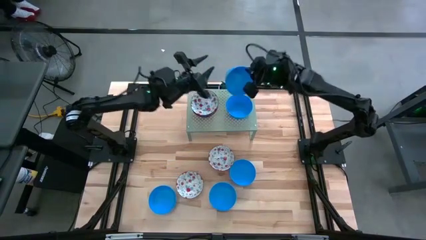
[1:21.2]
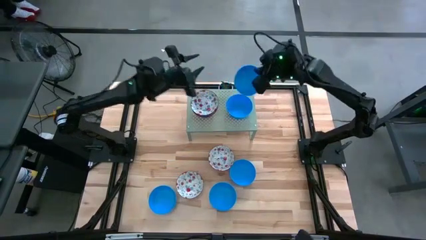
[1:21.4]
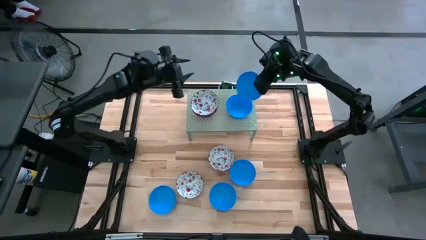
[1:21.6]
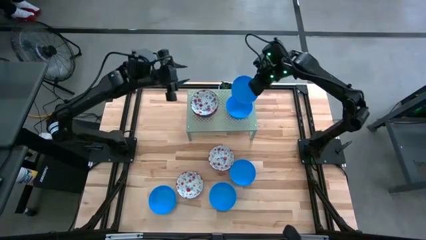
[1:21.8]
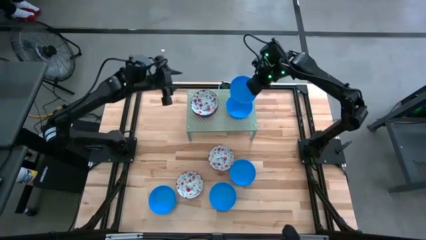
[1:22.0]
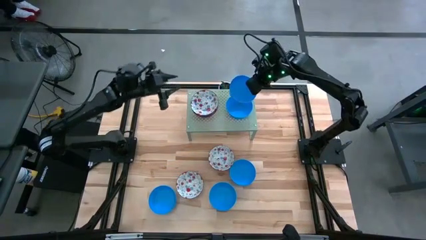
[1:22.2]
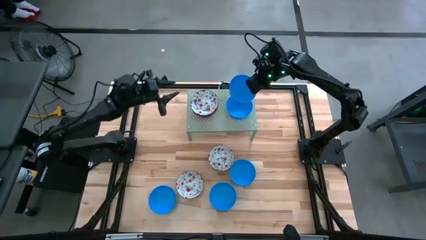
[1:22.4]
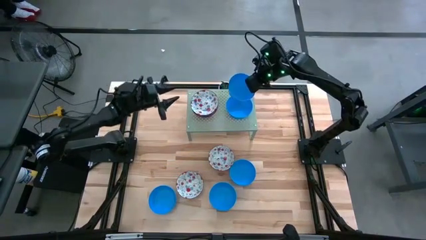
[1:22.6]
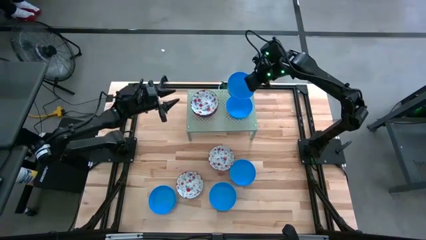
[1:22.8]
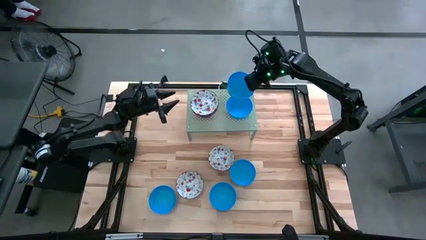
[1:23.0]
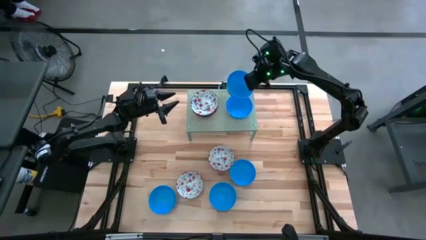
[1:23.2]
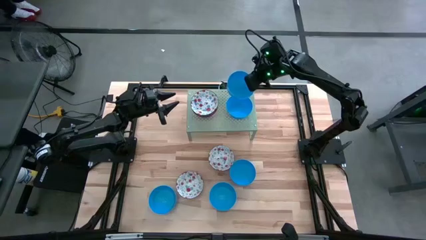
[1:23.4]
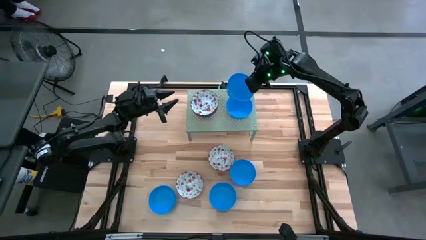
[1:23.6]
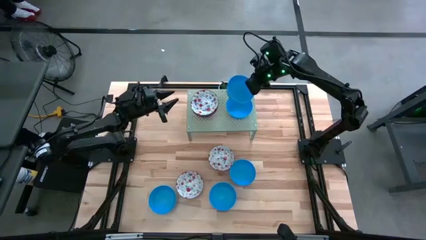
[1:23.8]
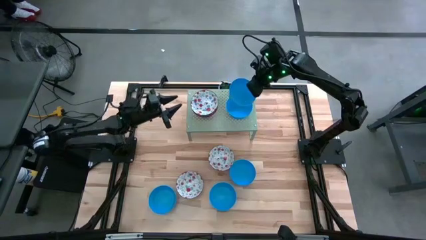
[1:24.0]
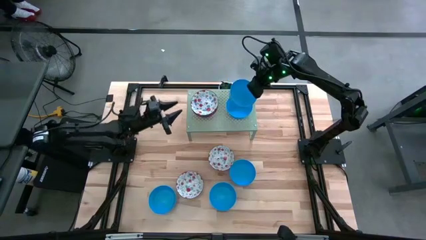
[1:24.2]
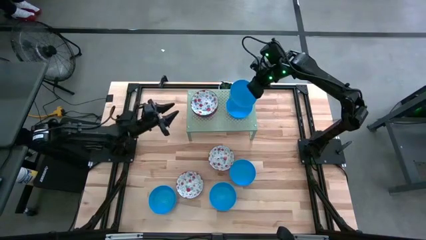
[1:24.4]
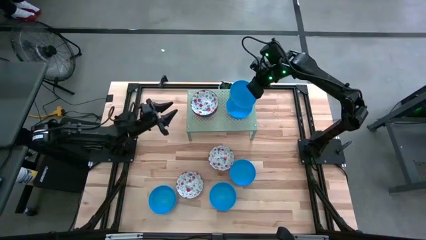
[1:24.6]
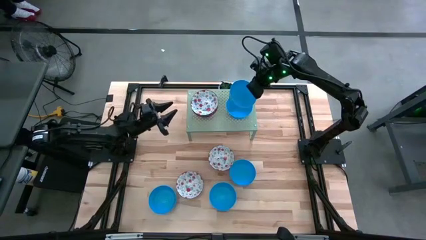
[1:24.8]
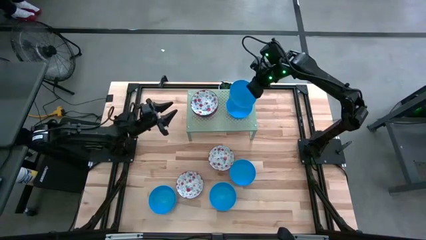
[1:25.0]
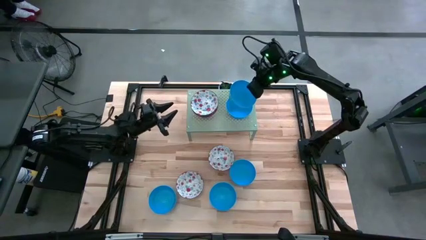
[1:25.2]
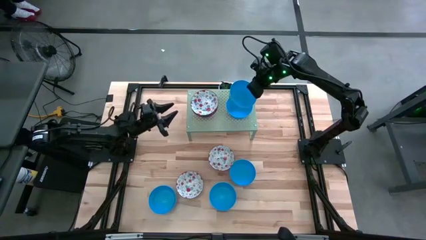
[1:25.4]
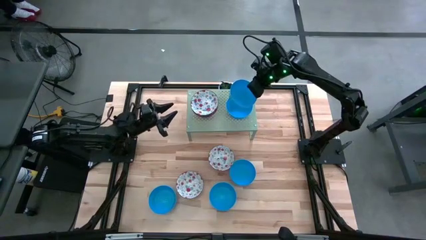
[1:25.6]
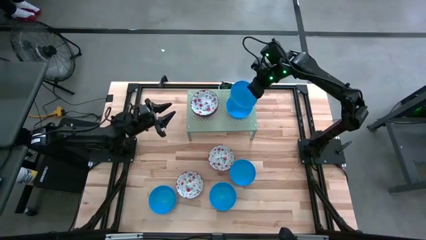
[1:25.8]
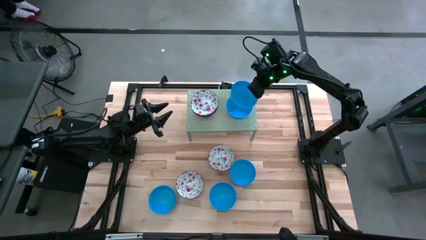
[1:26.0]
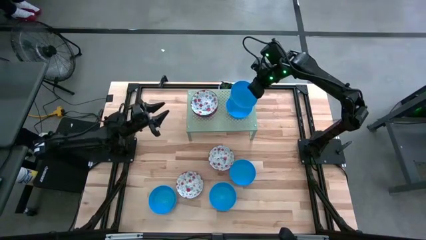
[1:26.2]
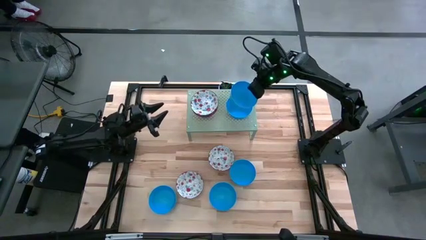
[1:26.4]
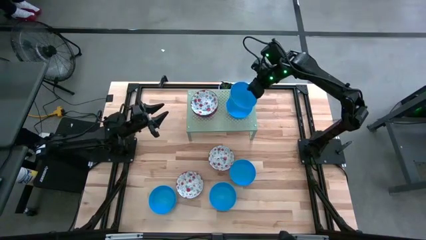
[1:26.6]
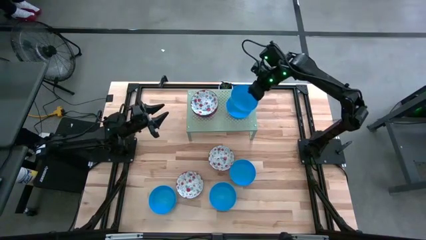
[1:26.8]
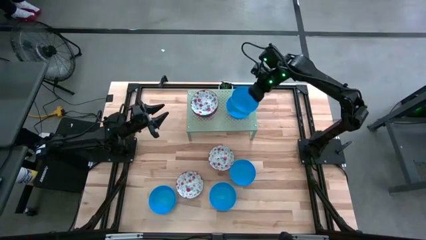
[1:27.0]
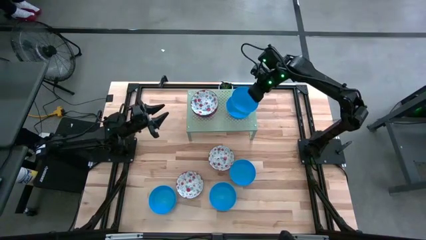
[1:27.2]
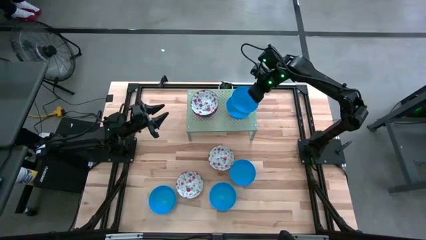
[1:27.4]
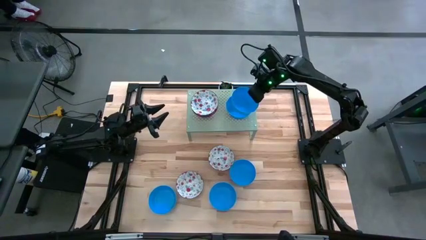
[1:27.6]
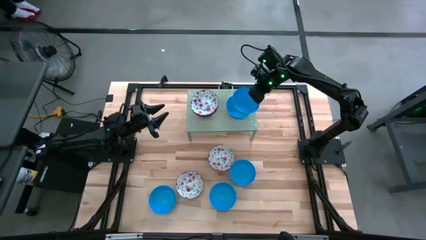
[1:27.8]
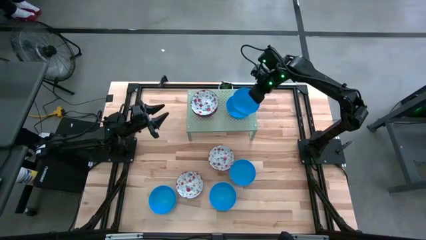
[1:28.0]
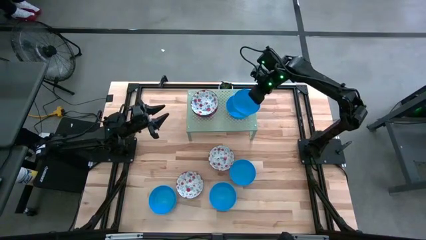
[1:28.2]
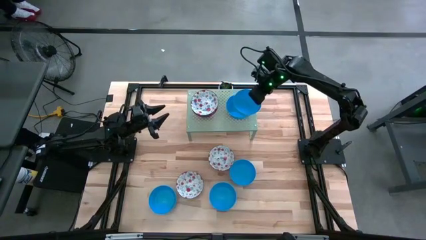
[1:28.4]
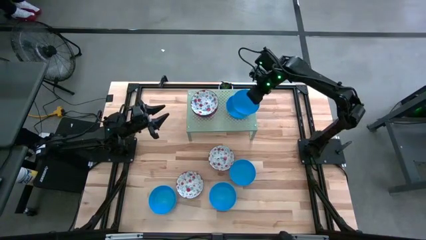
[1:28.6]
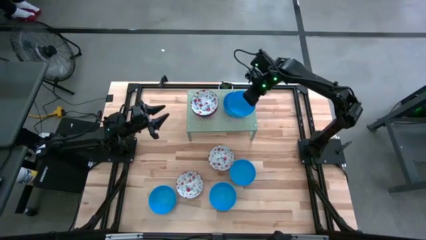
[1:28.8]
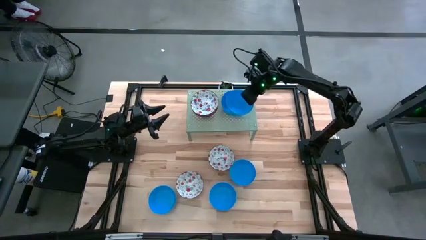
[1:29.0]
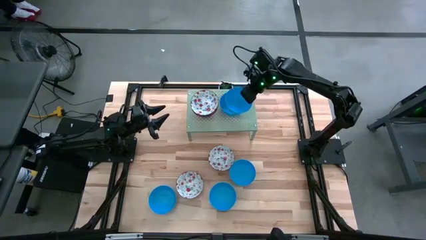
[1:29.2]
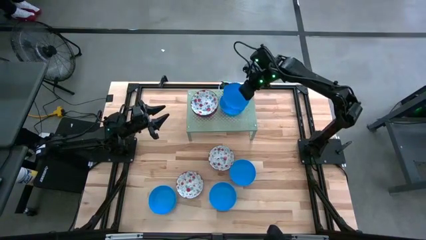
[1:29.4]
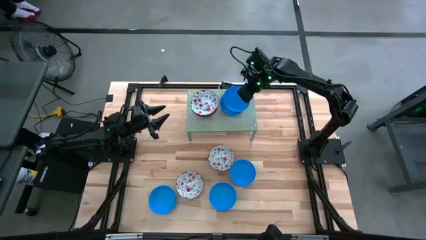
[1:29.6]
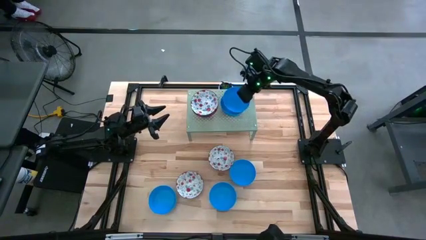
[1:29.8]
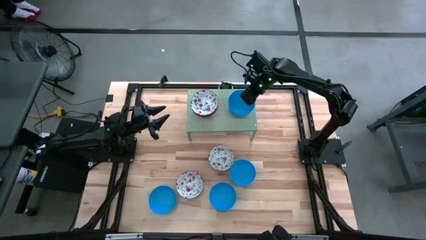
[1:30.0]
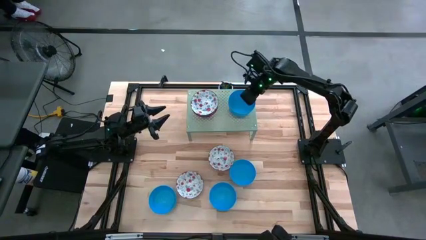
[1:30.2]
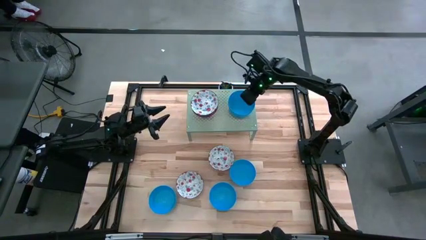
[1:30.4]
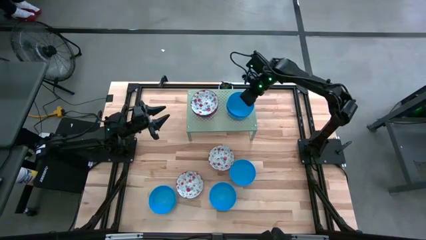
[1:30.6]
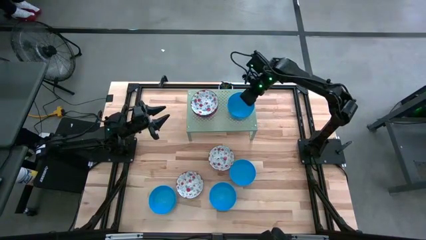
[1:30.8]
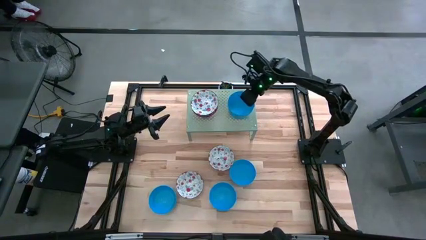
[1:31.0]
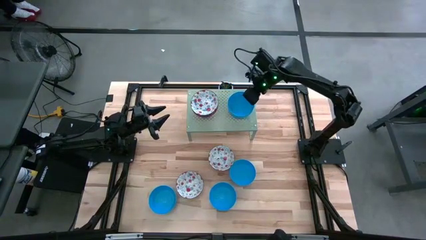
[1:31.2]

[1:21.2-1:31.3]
Task: Pick & Place Mini bowls
Stack the blue bowl on the blue bowl on the shelf

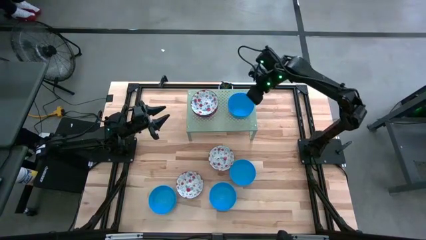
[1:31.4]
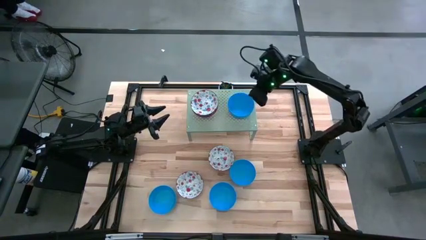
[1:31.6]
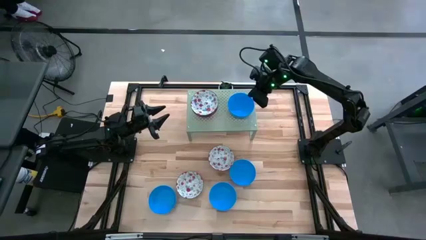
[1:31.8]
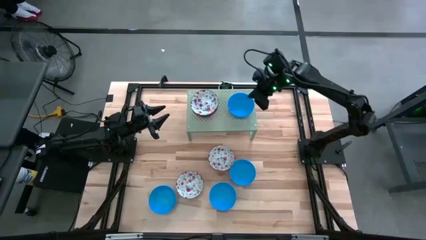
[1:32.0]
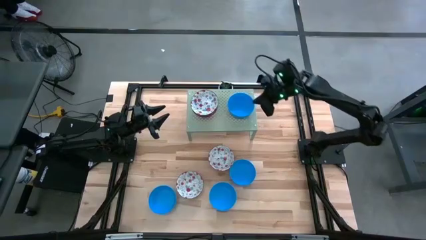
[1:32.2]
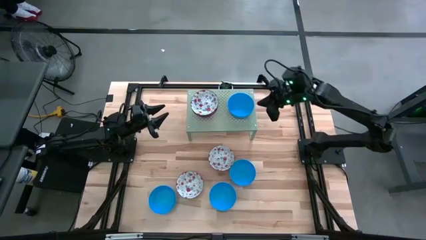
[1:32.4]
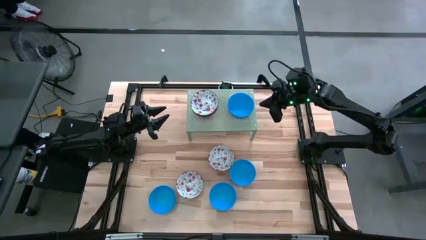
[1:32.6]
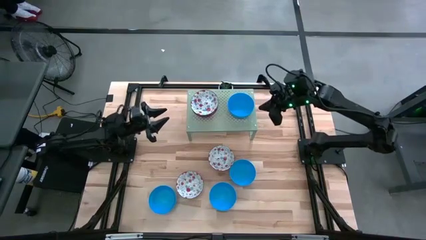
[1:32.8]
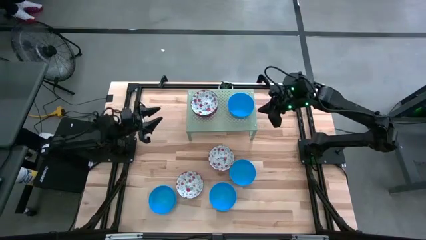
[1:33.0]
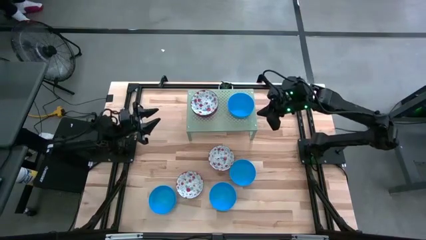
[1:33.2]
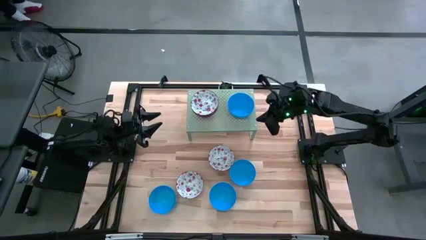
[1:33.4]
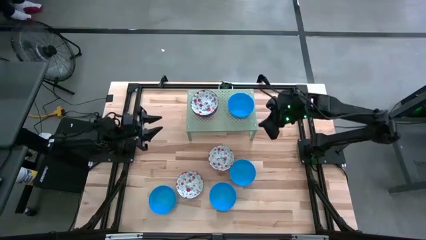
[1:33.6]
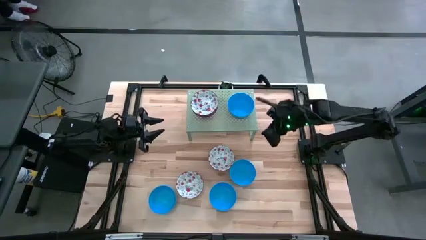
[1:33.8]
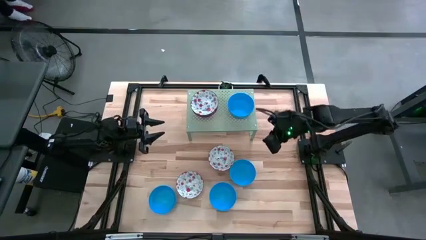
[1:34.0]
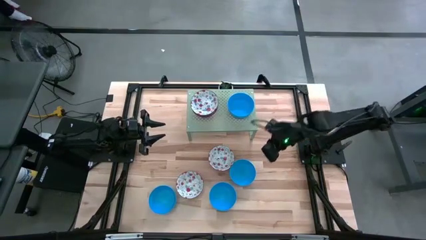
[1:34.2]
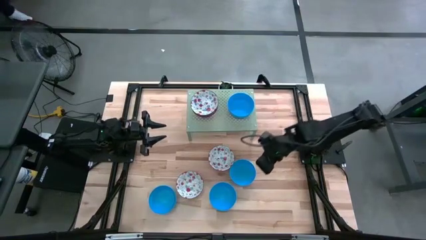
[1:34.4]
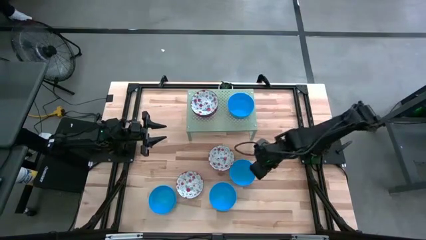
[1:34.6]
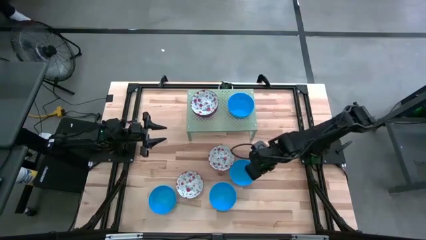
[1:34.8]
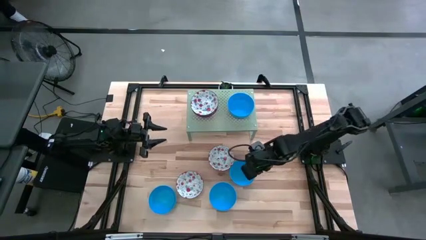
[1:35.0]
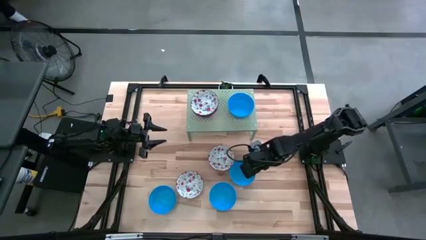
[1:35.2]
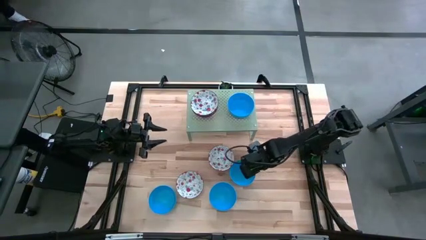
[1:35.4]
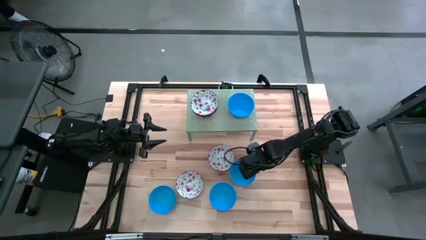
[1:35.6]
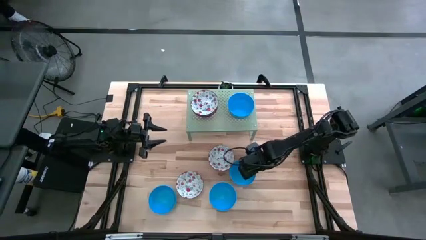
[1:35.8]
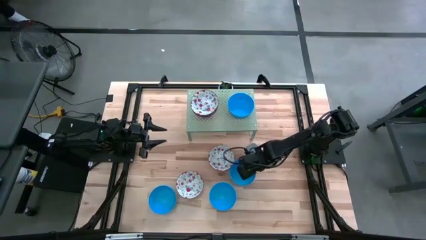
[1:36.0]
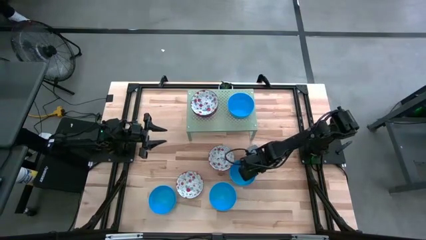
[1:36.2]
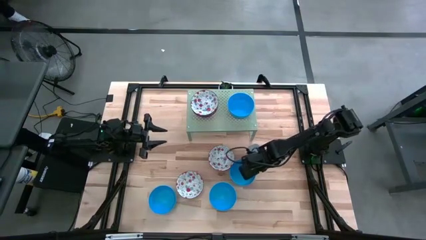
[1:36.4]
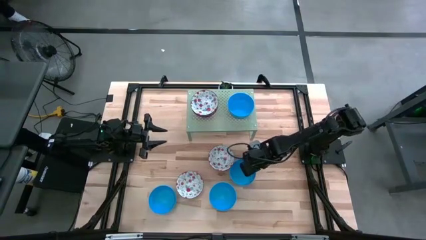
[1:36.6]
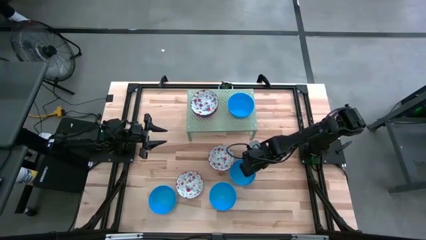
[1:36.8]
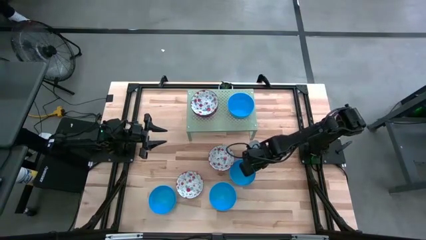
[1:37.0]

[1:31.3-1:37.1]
Stack the blue bowl on the blue bowl on the shelf
